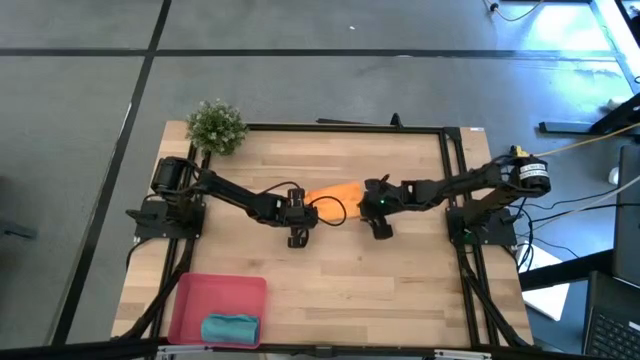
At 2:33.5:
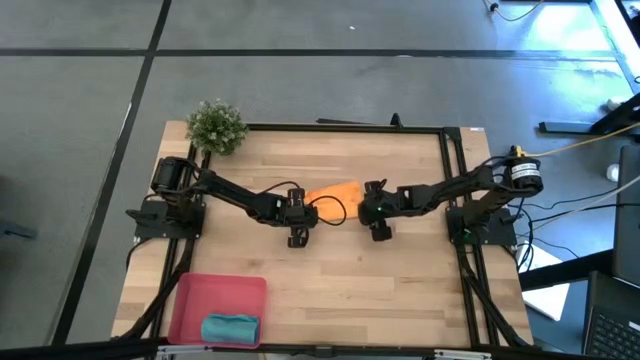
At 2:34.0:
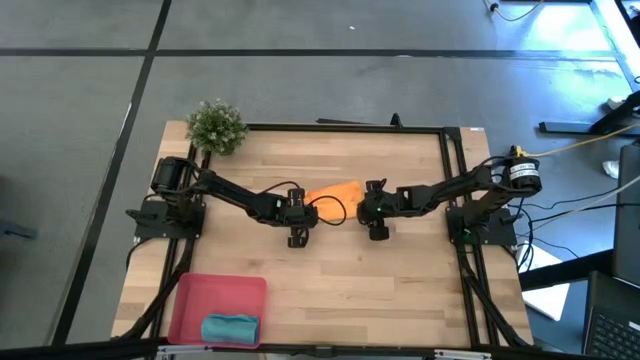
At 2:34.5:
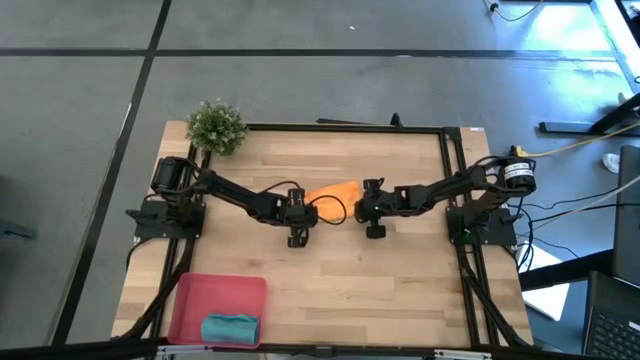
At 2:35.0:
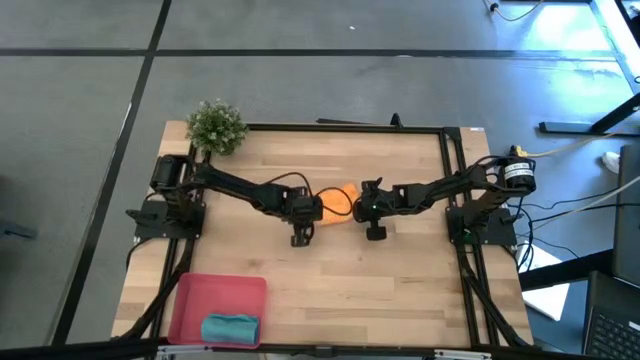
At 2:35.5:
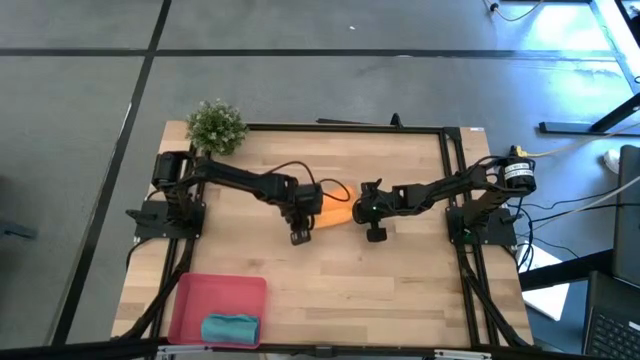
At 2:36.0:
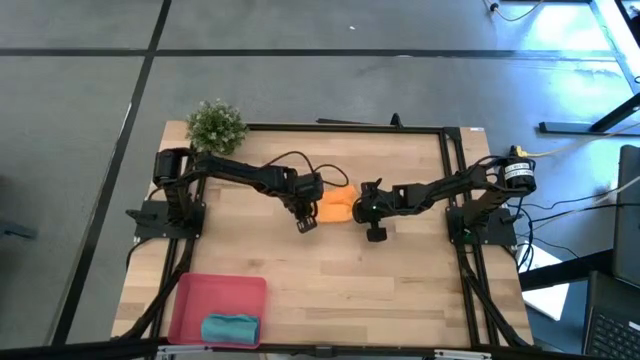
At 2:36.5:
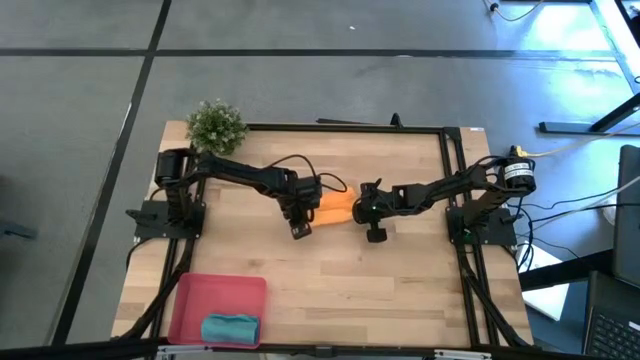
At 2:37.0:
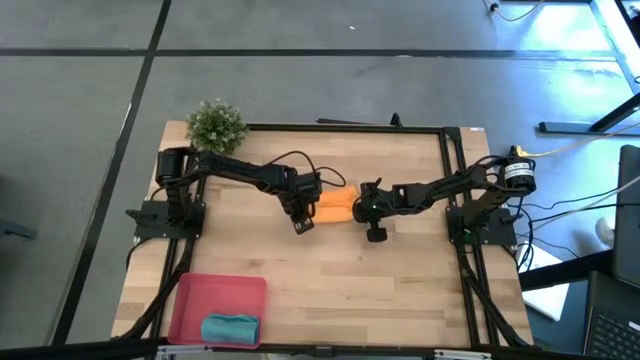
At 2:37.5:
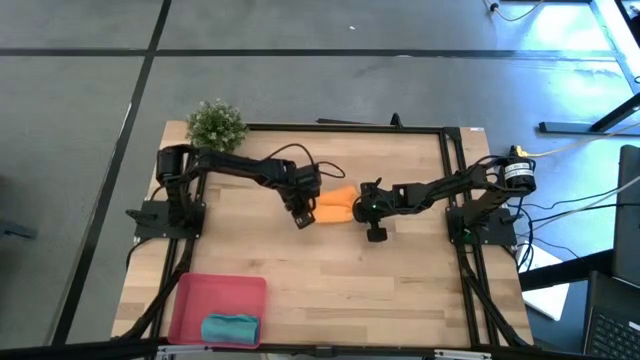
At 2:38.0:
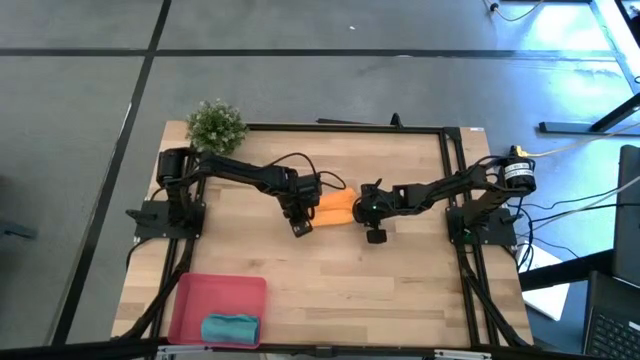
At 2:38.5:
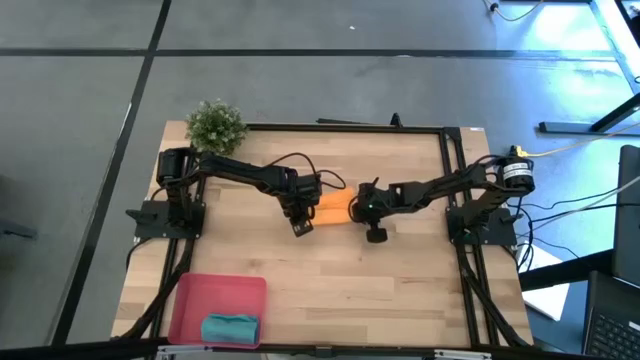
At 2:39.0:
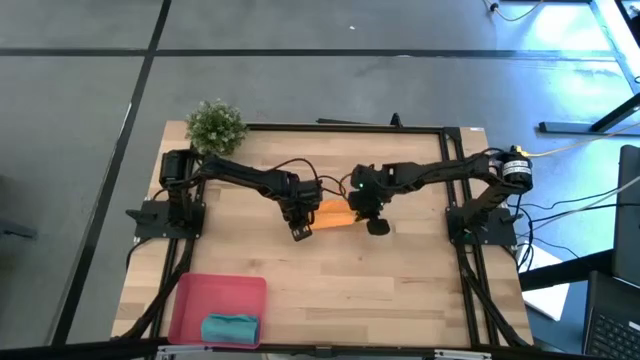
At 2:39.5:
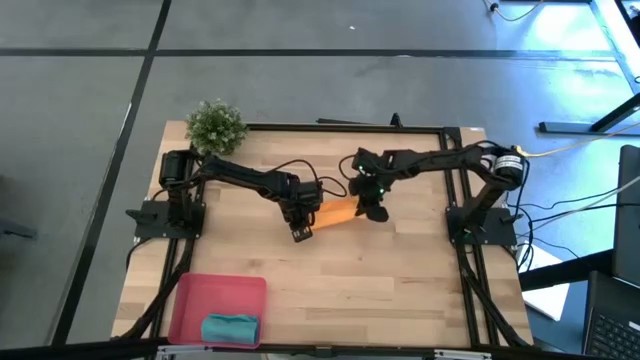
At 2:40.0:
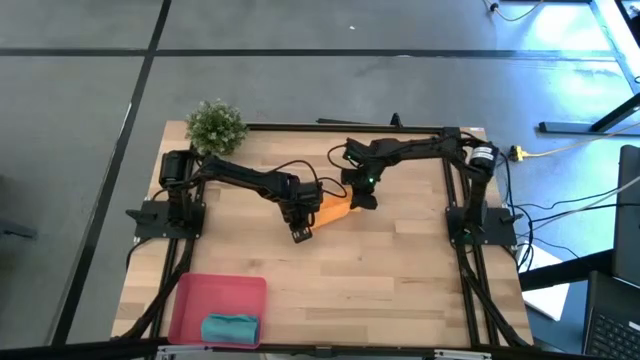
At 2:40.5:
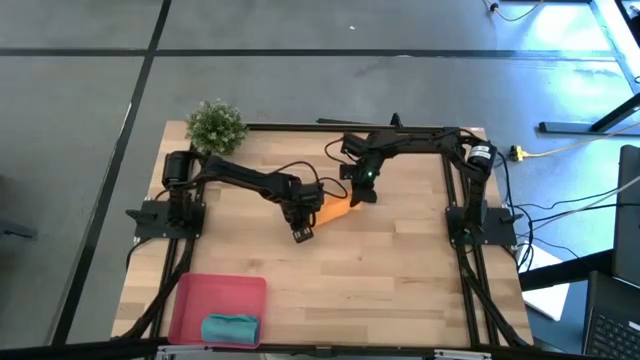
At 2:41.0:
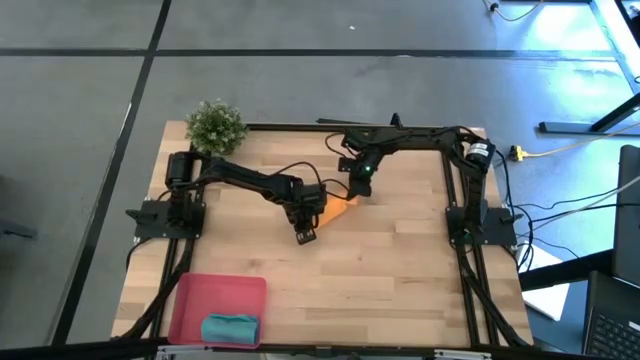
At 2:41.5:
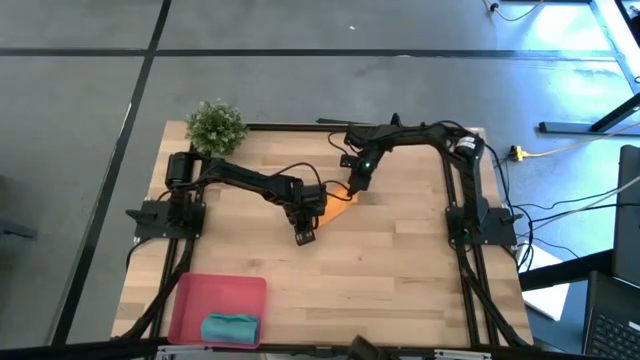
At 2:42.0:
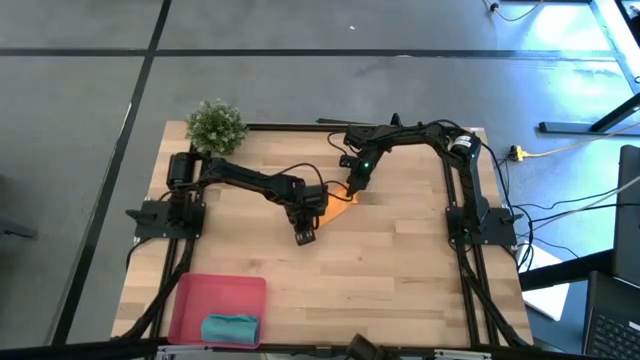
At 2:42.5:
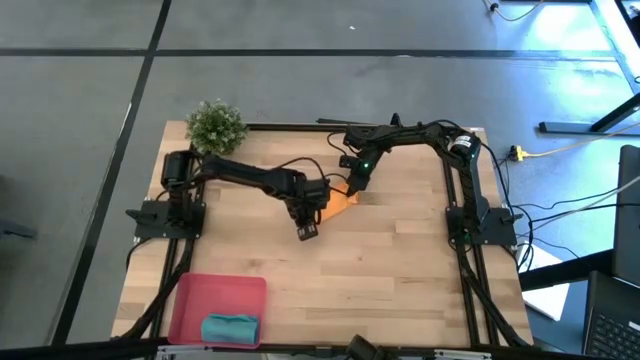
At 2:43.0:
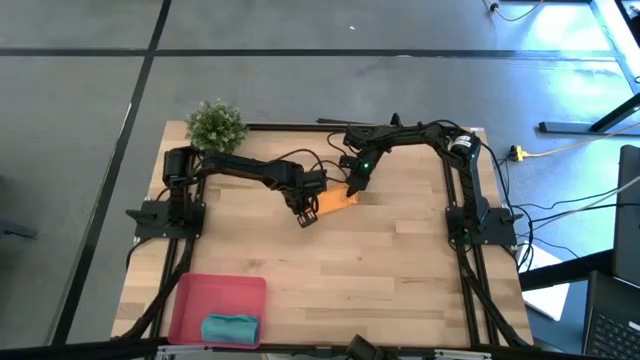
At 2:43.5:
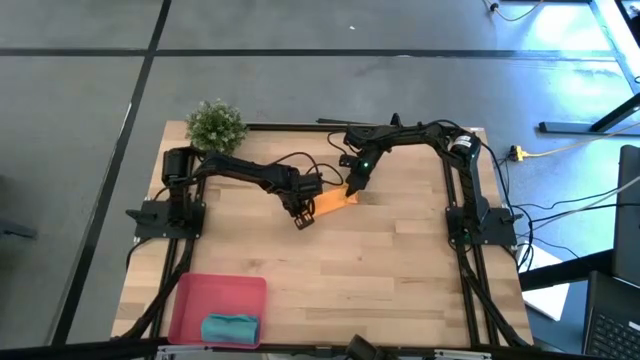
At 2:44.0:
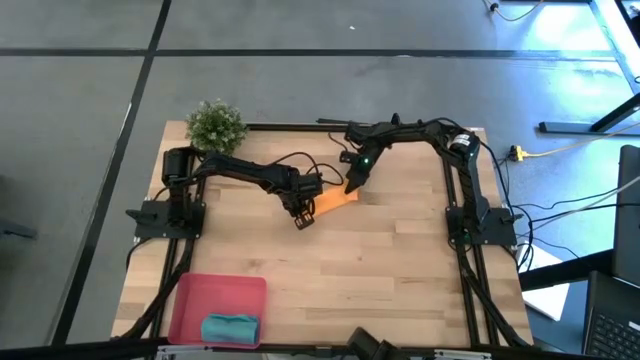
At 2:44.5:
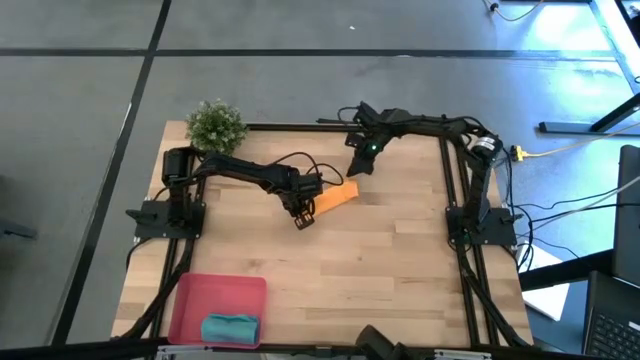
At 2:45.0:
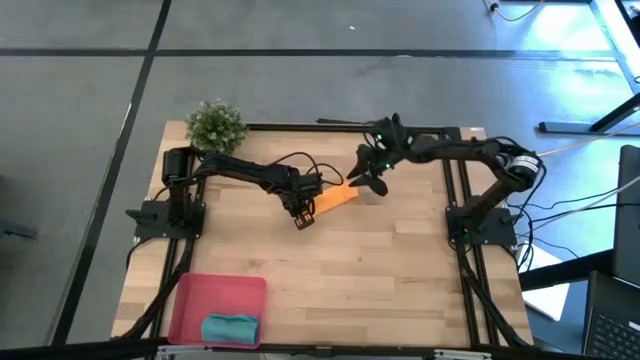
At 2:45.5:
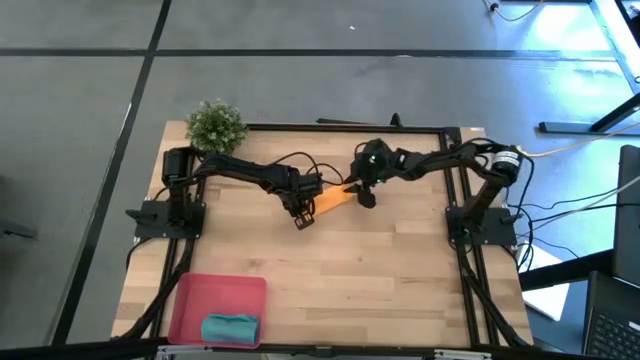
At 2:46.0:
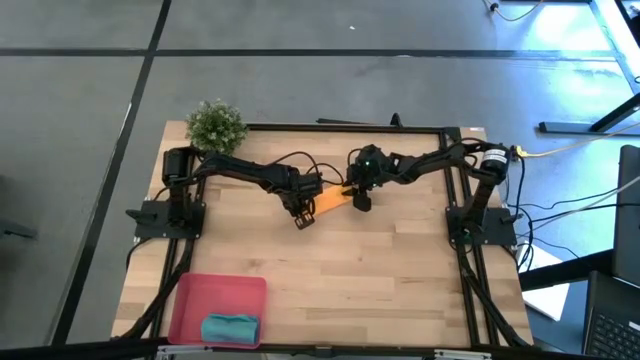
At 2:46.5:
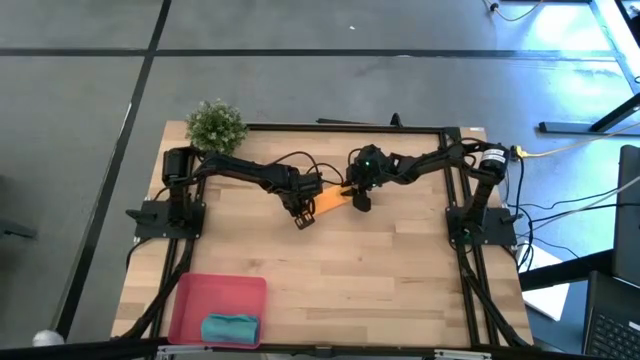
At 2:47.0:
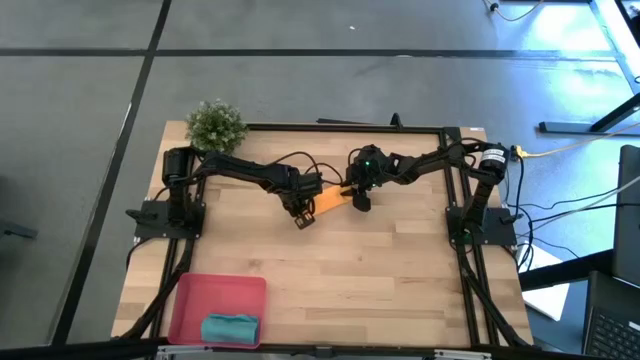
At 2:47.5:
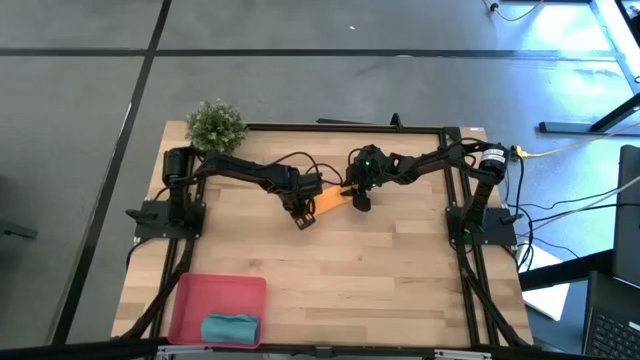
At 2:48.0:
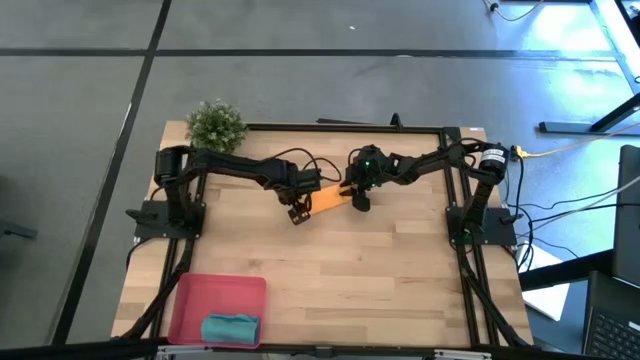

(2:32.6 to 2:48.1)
Task: Roll microfiber towels into tight, uniform cylinder then place into a basket
Roll the orange microfiber towel

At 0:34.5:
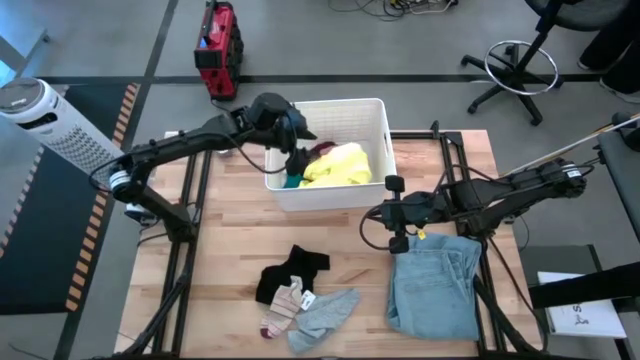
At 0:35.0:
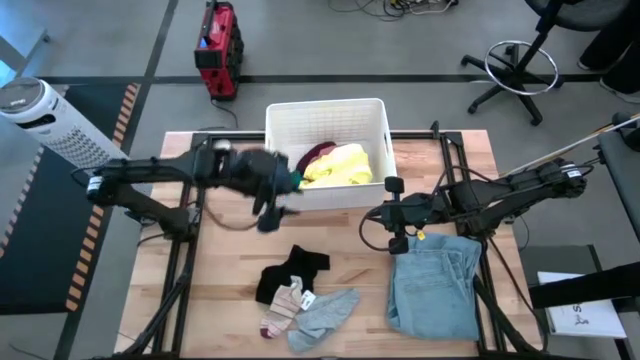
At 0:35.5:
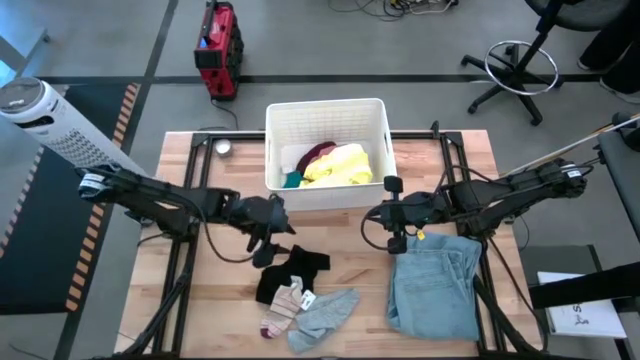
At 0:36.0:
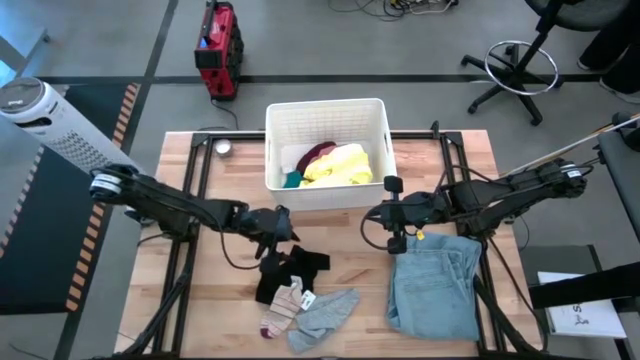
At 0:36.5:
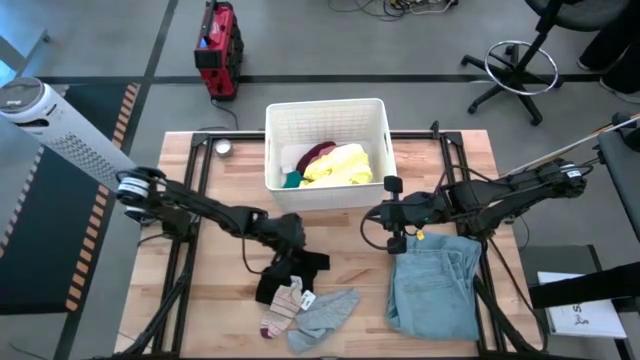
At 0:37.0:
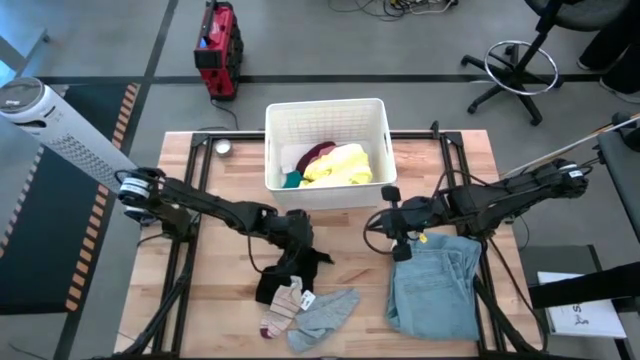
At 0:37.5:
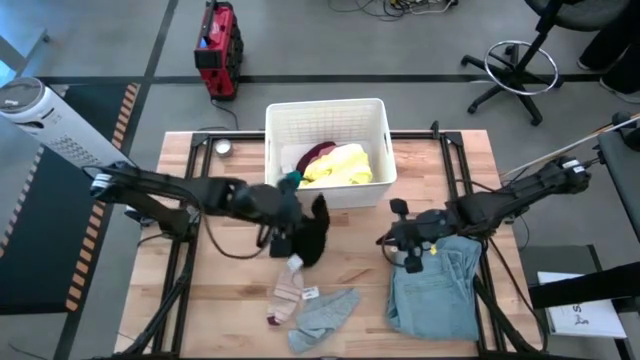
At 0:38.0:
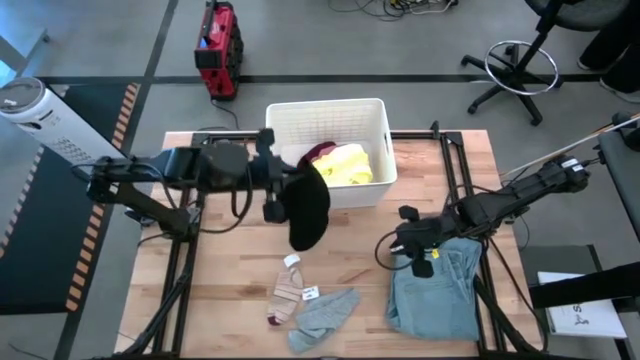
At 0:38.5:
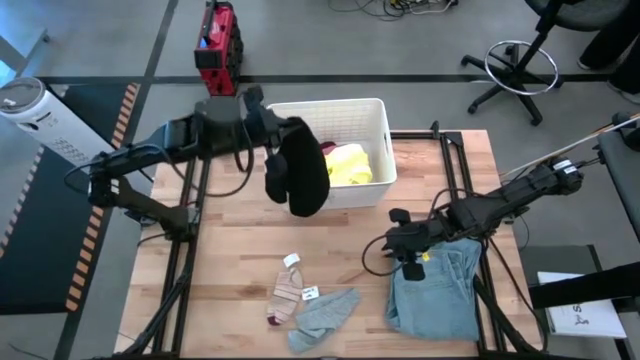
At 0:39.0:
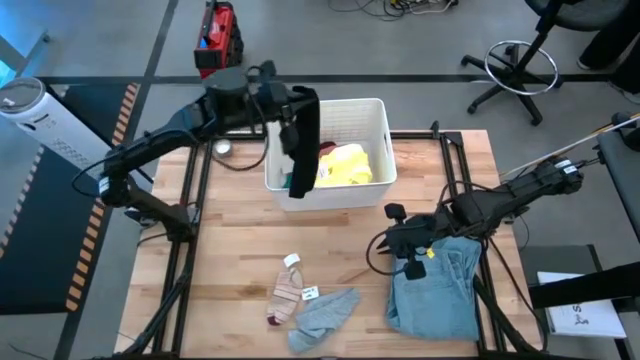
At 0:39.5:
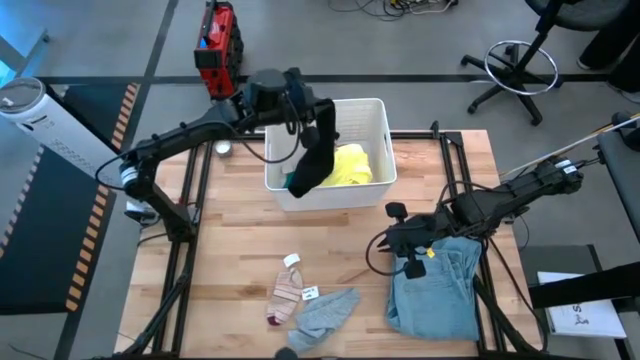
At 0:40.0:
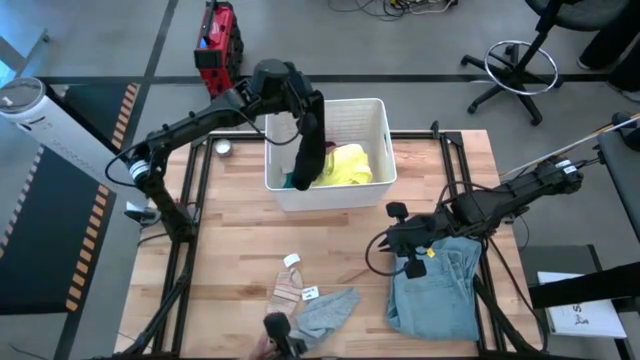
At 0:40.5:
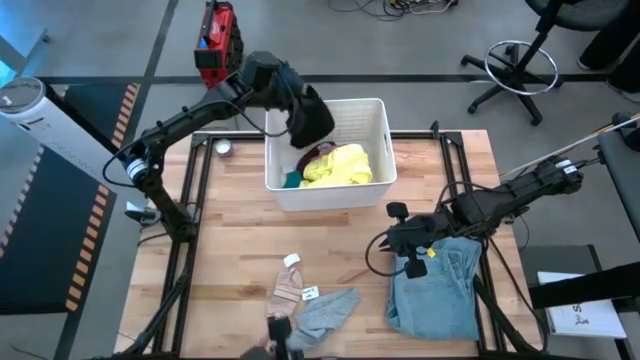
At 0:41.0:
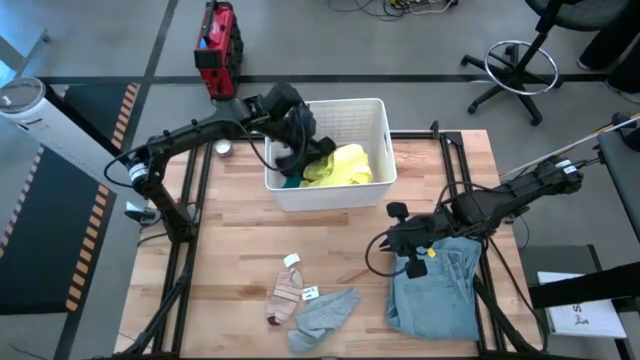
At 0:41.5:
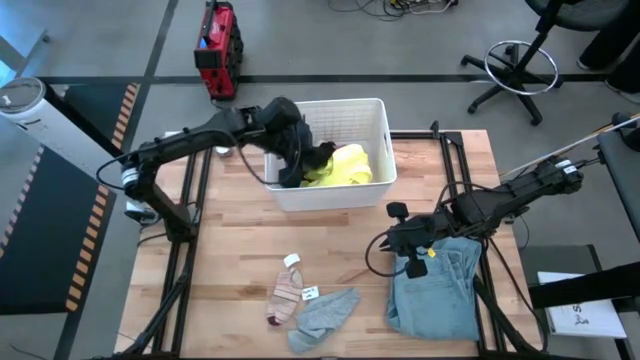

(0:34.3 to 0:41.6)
Task: Sort clothes
Put the black boxer into the white laundry bin
